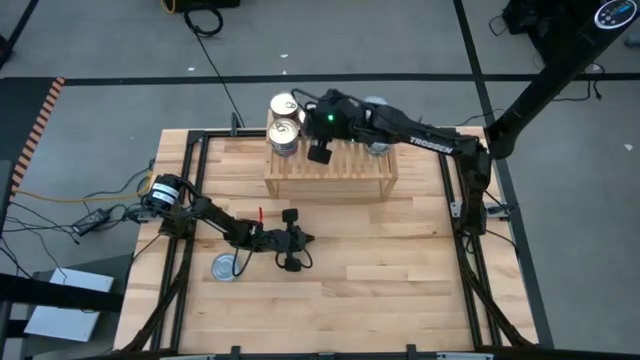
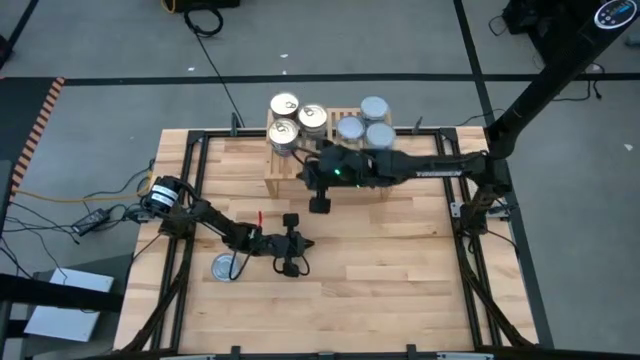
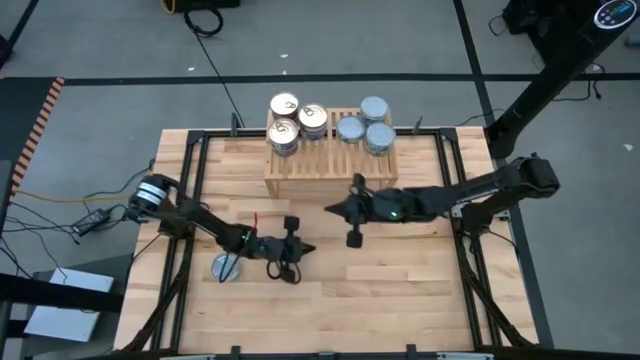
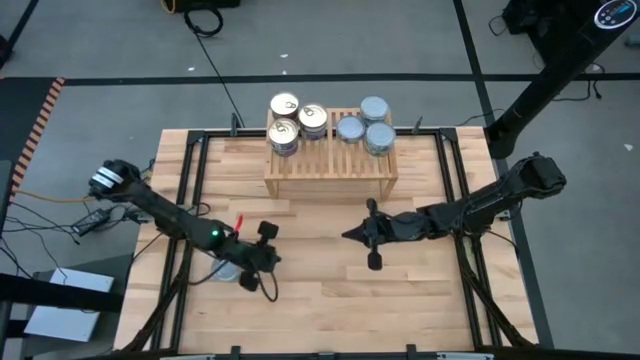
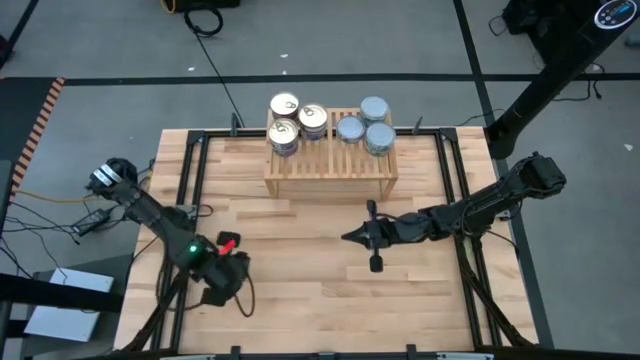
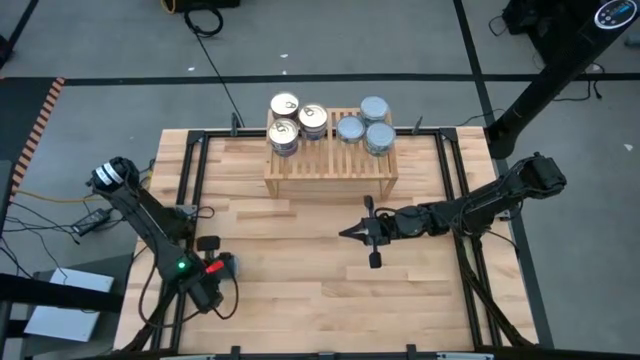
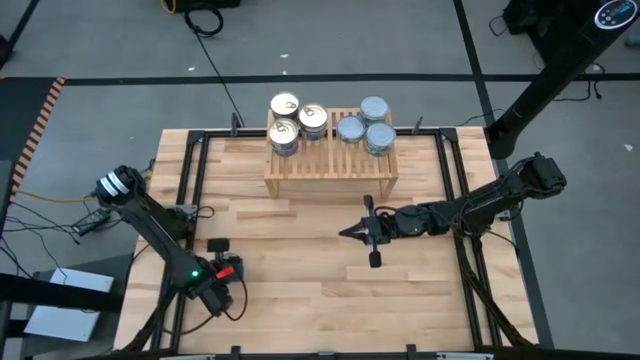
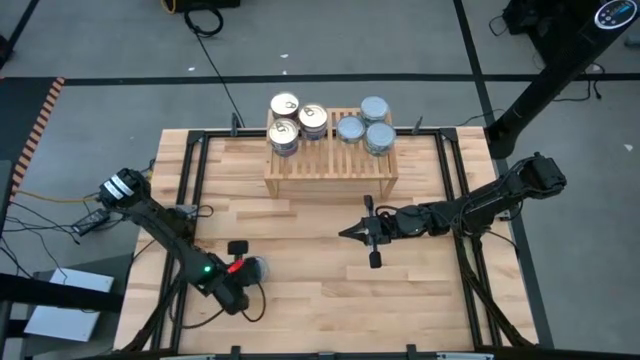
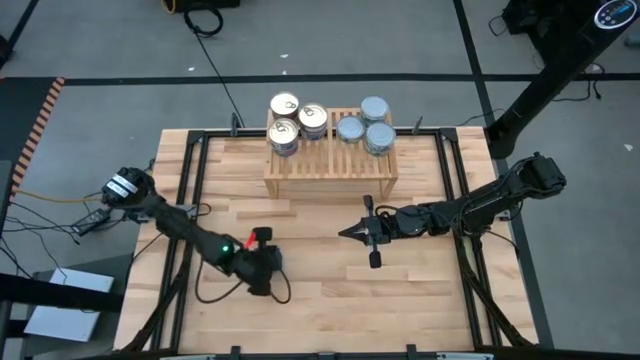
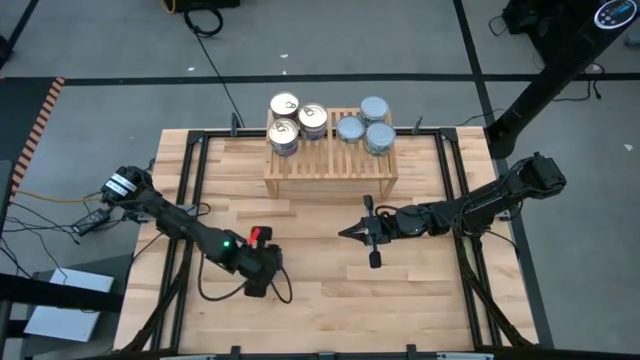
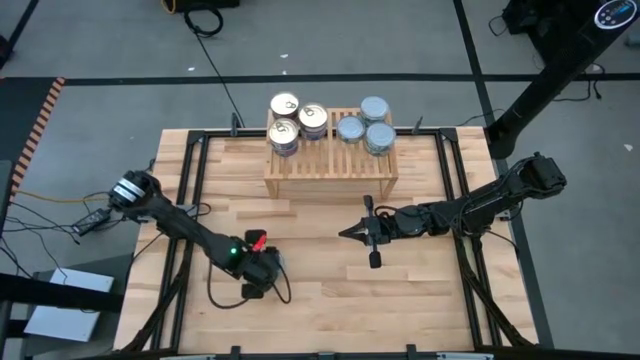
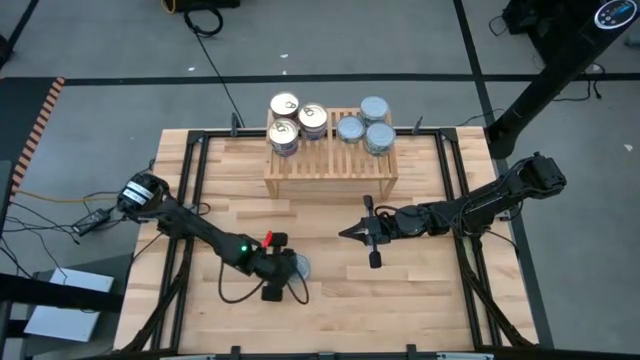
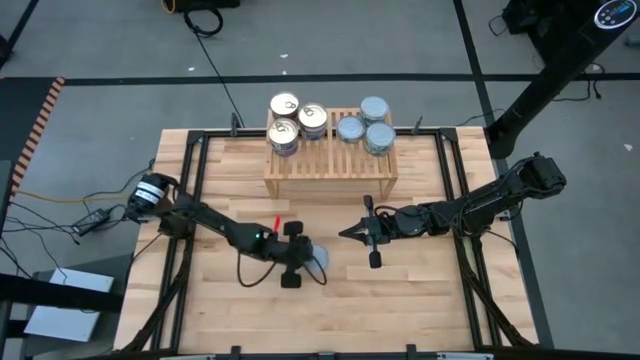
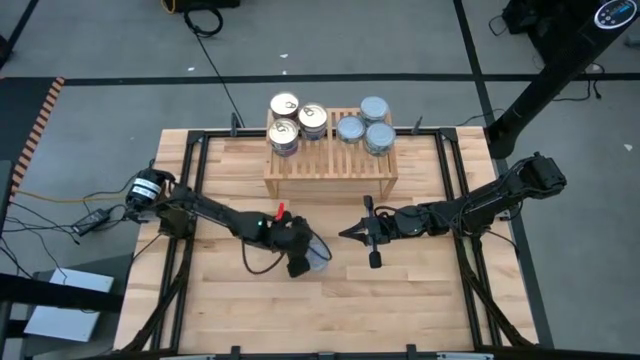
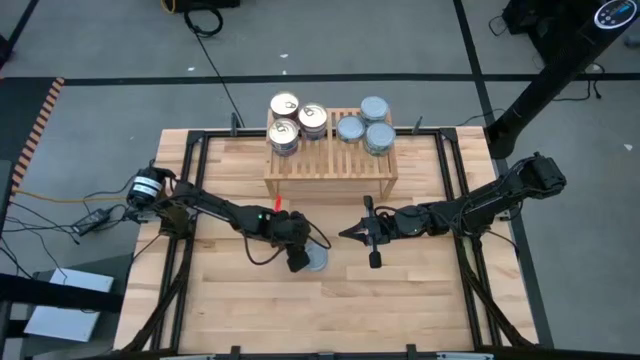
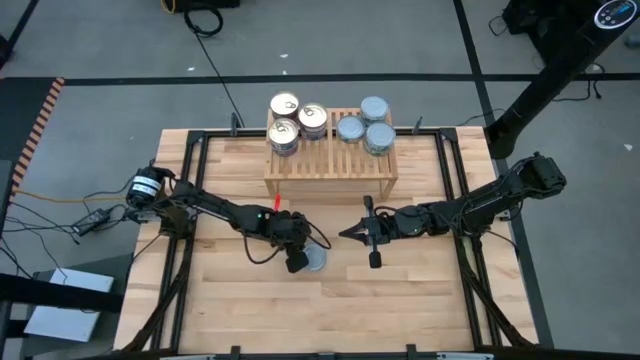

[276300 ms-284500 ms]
Task: Stack canned seafood by type on shelf
Stack the green tuna can on top of the green tuna can on the shelf

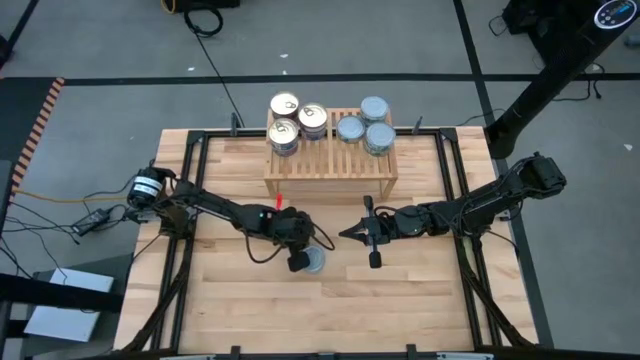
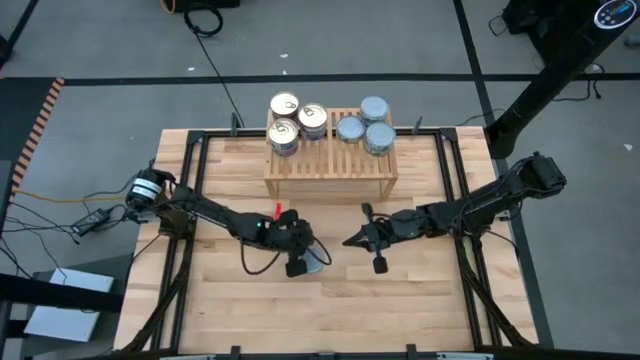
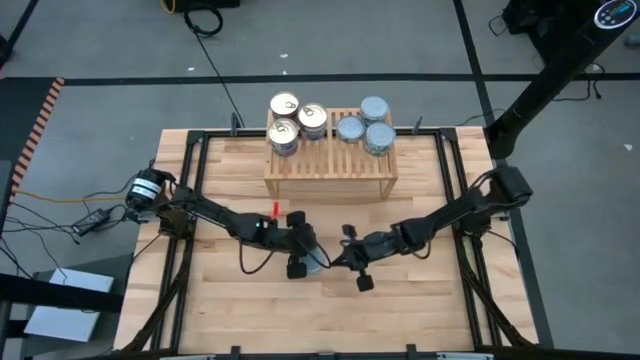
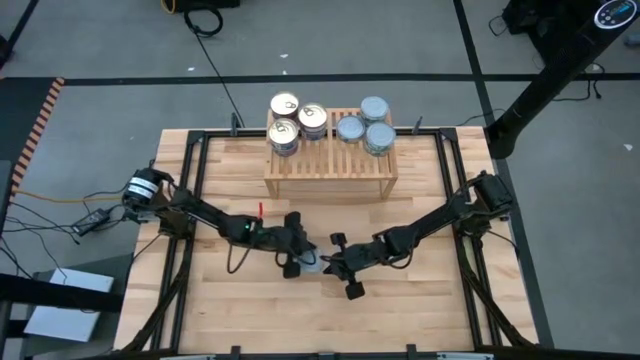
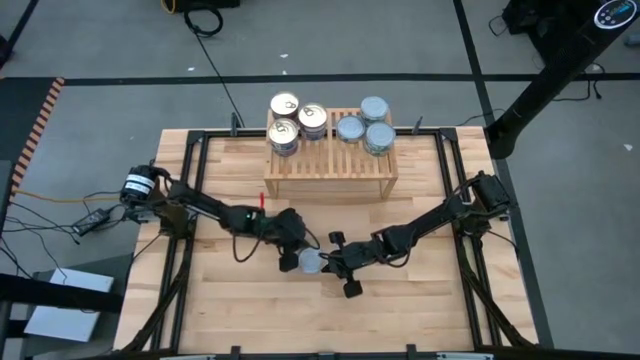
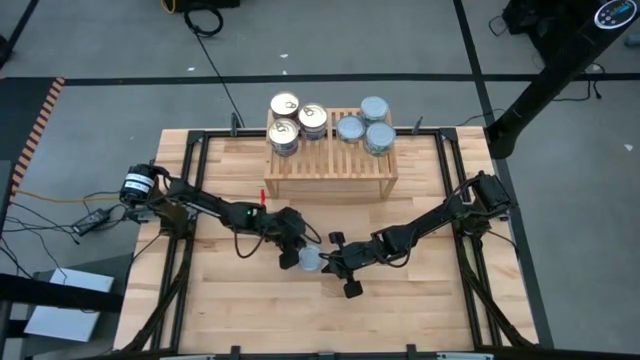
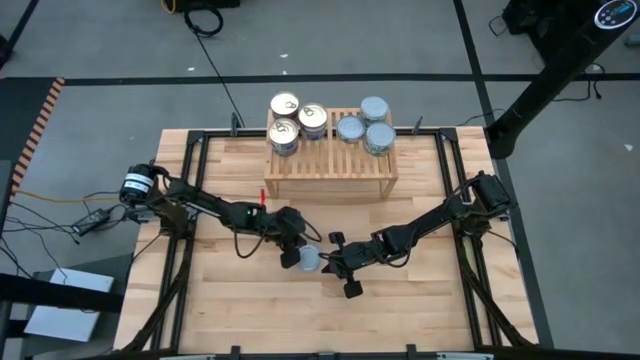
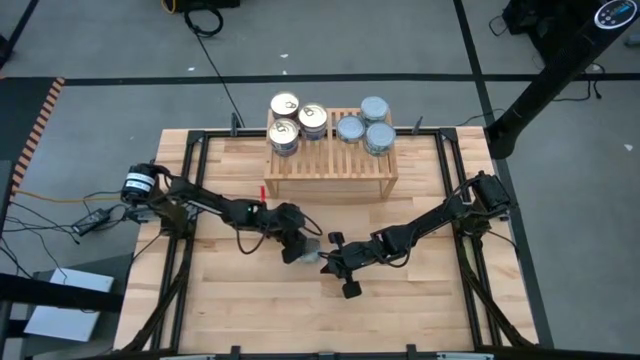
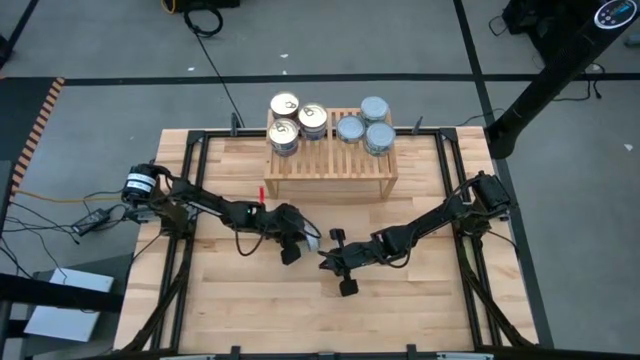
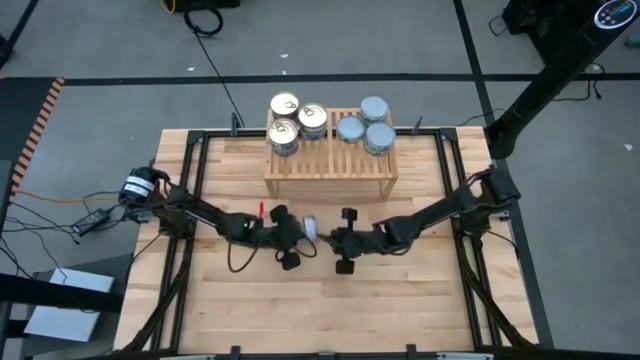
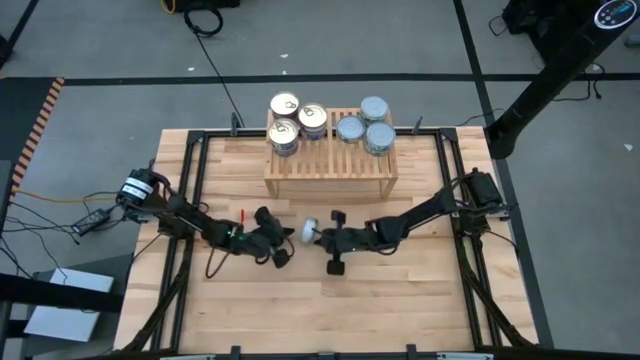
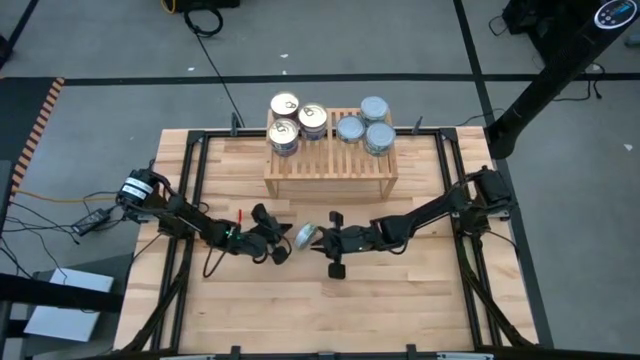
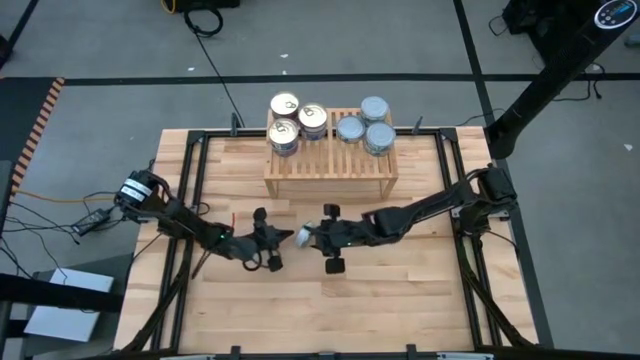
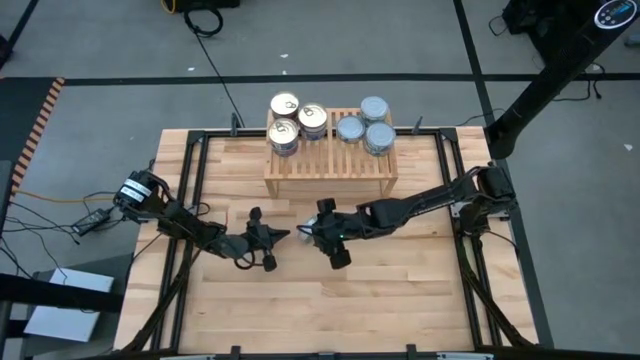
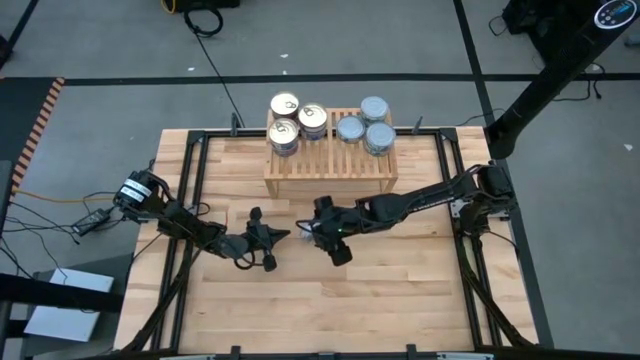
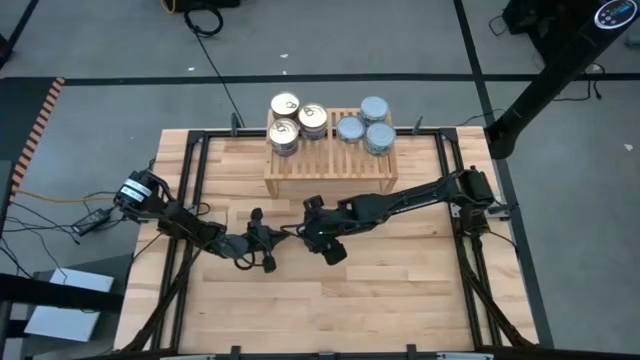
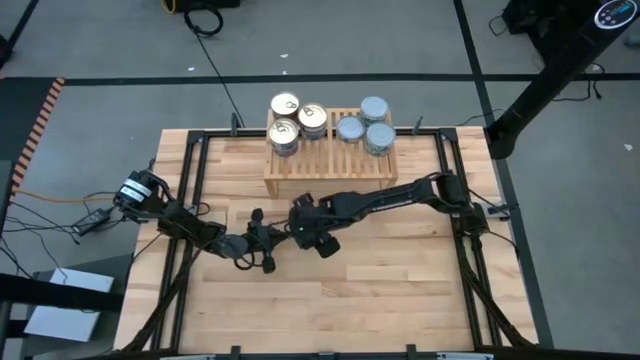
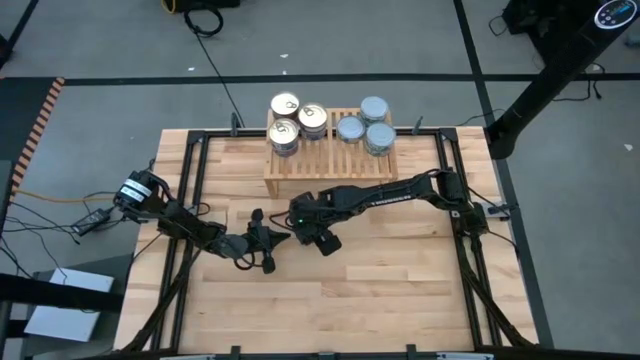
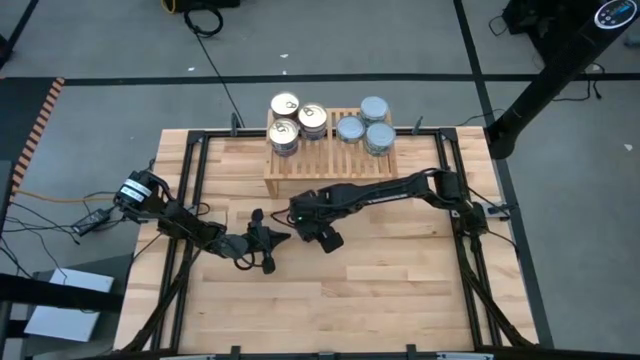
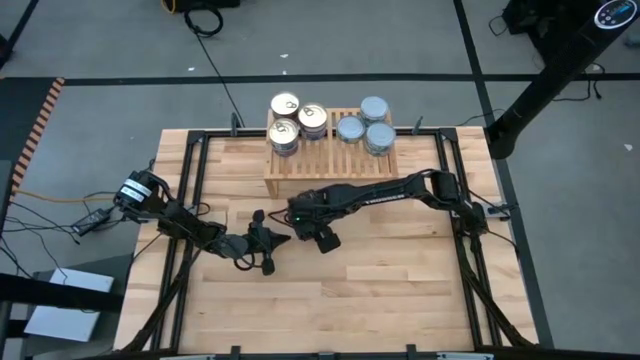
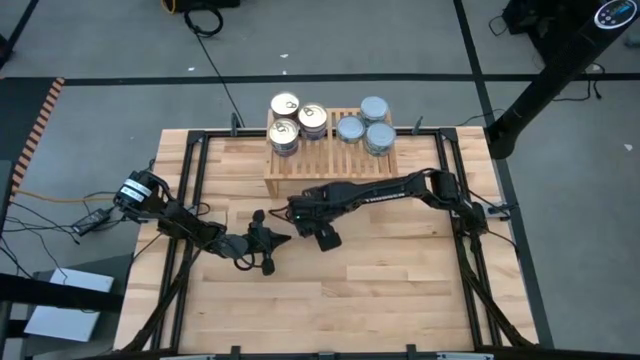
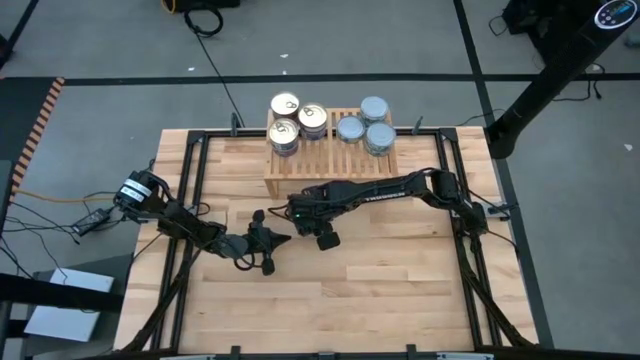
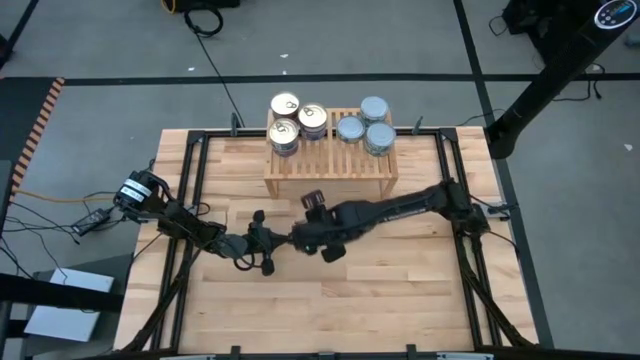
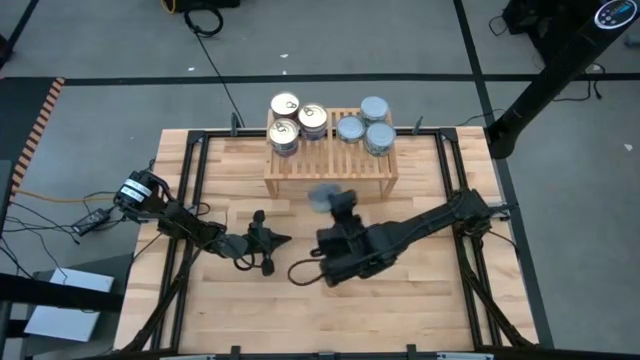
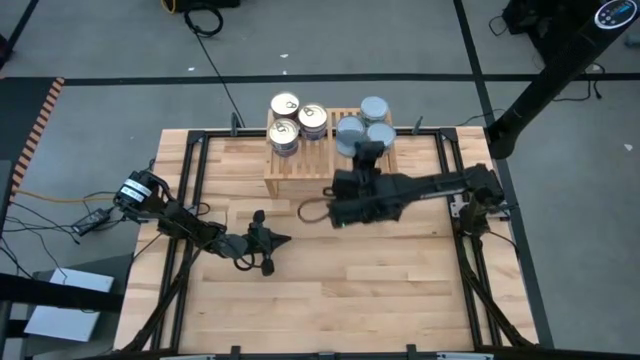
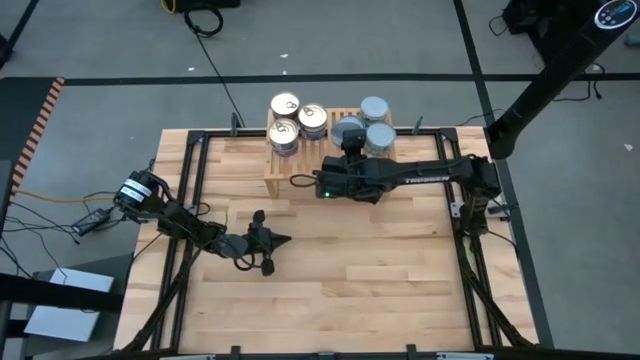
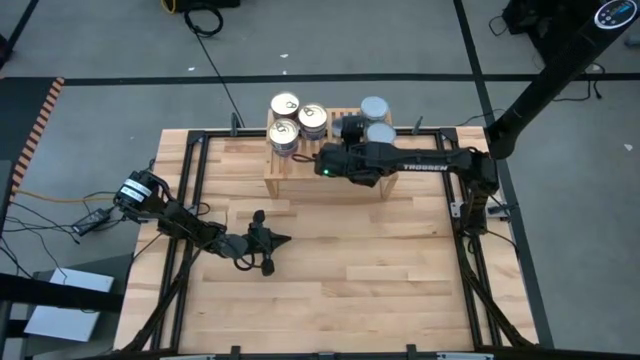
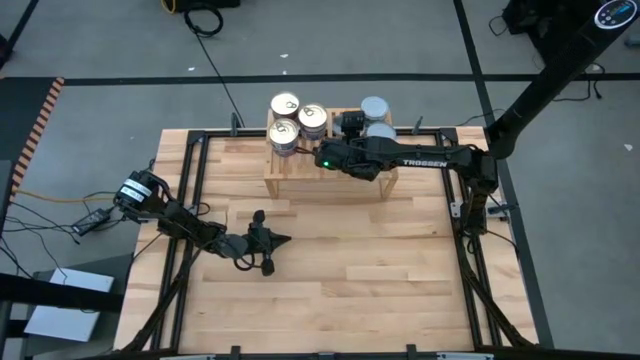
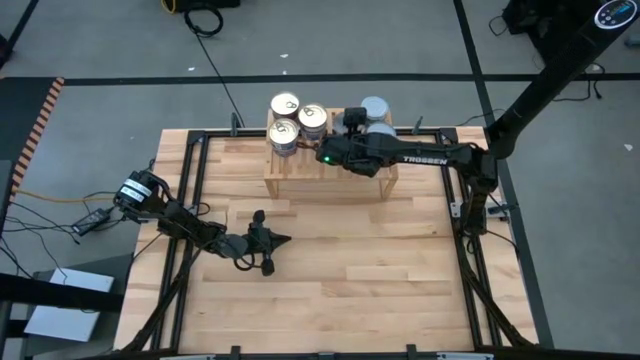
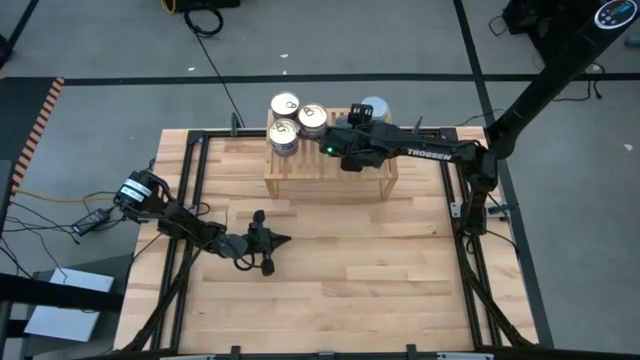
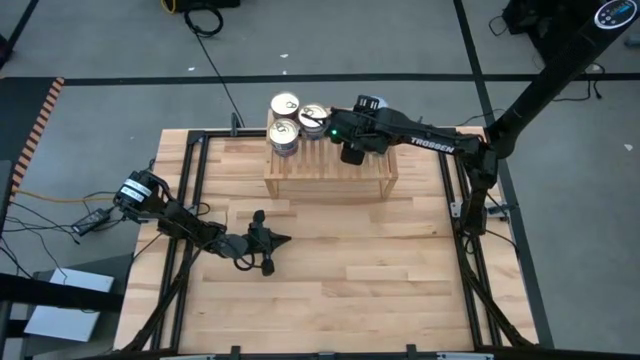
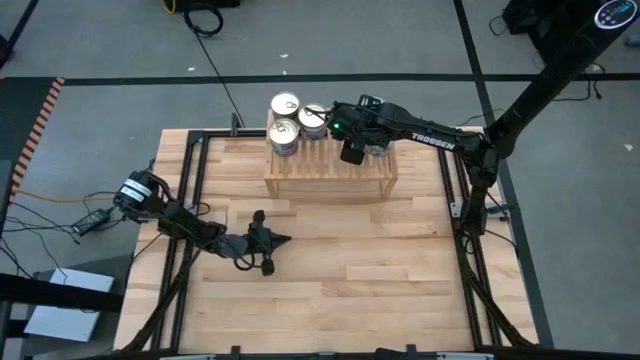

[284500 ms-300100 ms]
Stack the green tuna can on top of the green tuna can on the shelf
